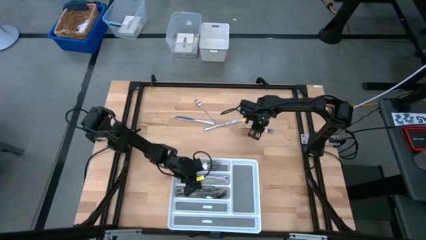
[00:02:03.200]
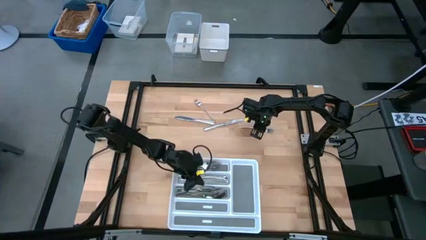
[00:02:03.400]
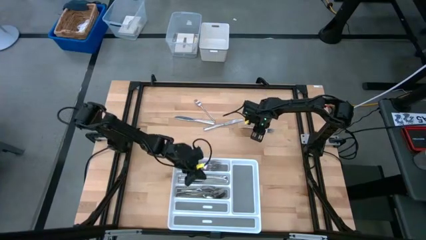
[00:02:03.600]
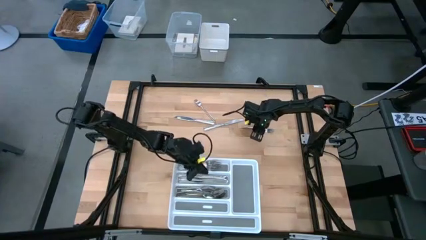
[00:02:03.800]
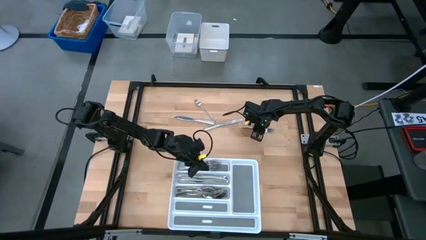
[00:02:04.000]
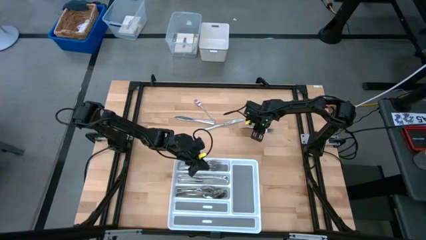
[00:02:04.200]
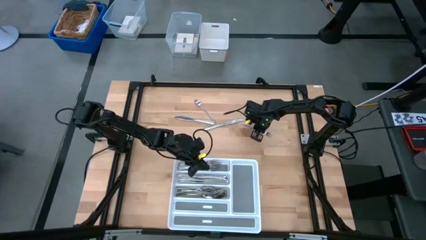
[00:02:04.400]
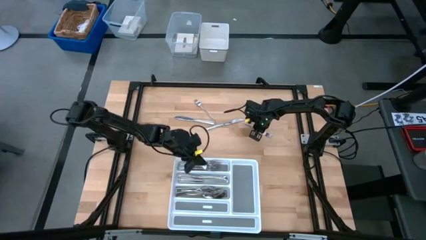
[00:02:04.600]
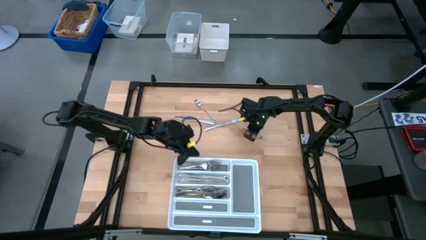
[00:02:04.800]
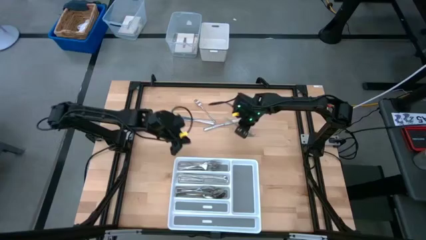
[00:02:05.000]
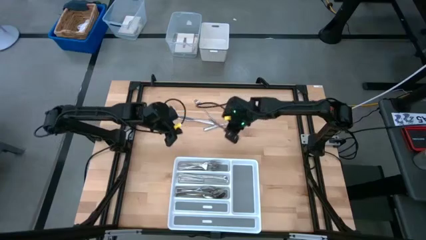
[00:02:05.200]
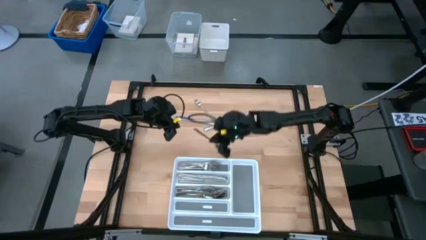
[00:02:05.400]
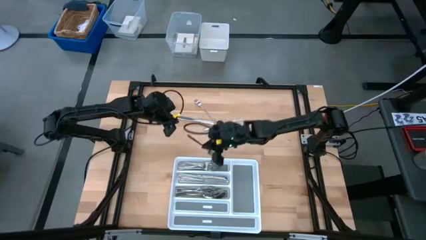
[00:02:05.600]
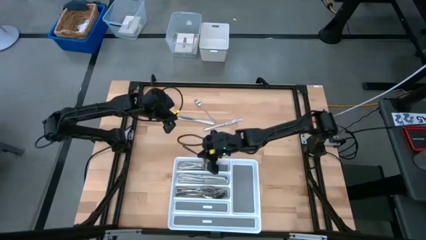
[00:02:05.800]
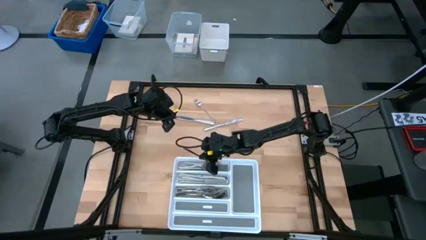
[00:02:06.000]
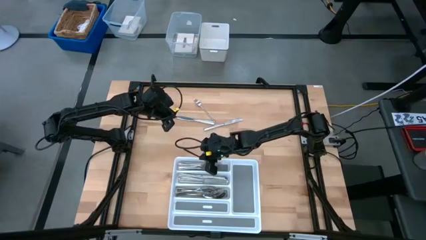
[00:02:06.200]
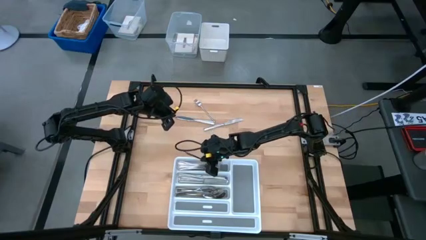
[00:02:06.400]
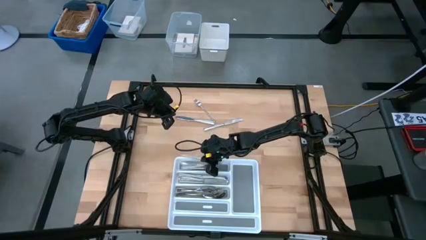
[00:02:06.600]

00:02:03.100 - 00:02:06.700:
Task: Sort silverware
Put the silver fork into the top section of the white silverware tray

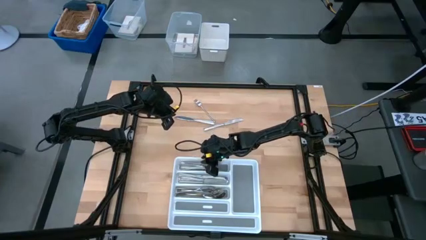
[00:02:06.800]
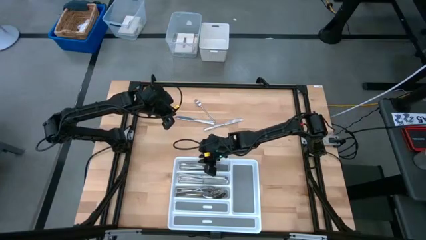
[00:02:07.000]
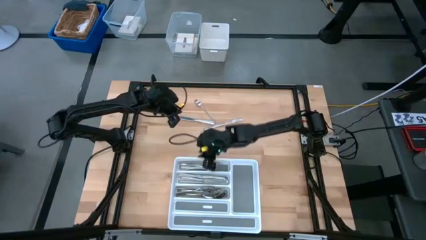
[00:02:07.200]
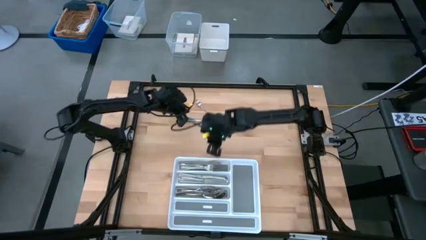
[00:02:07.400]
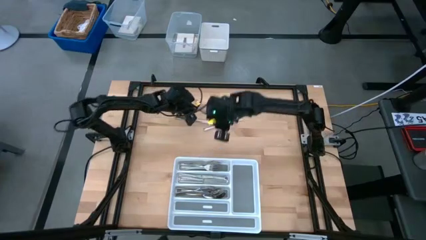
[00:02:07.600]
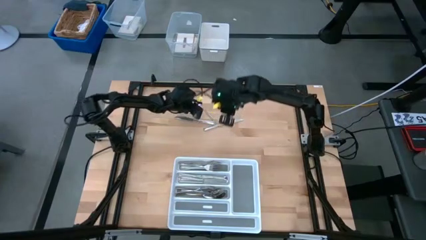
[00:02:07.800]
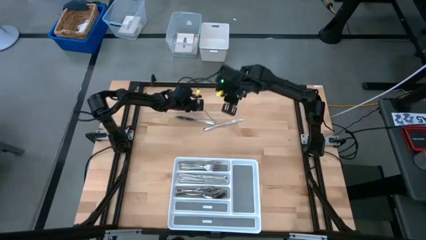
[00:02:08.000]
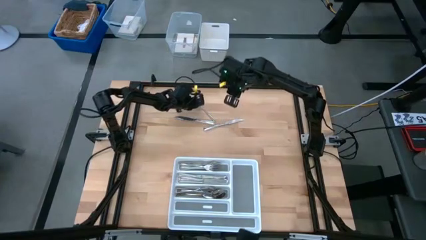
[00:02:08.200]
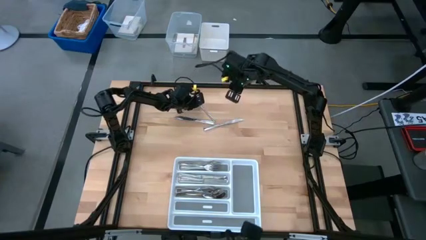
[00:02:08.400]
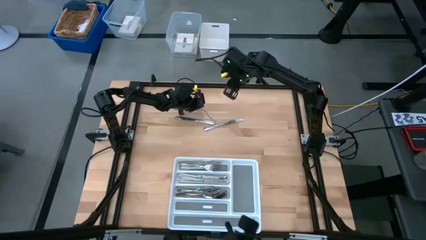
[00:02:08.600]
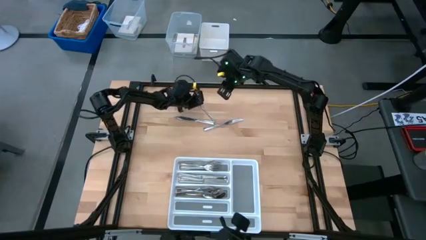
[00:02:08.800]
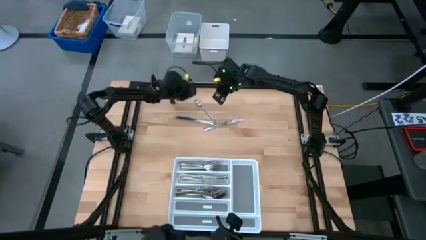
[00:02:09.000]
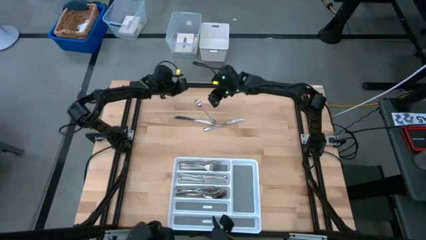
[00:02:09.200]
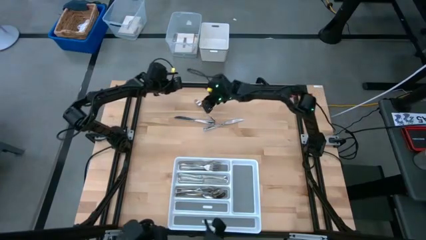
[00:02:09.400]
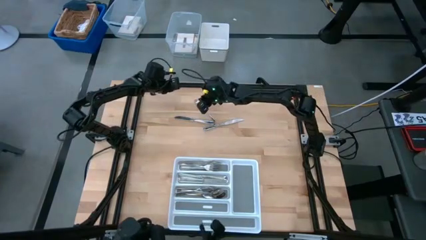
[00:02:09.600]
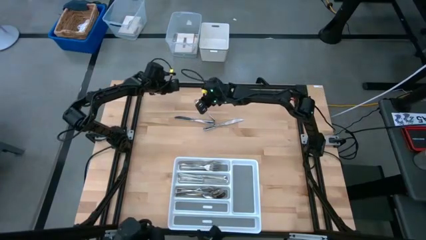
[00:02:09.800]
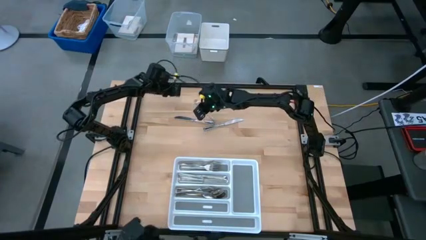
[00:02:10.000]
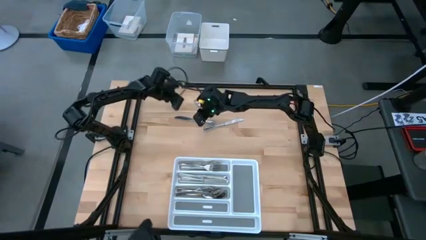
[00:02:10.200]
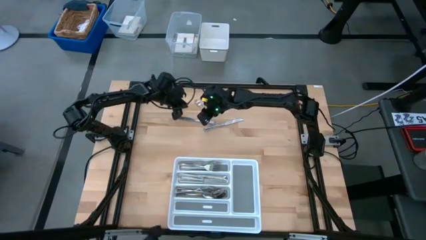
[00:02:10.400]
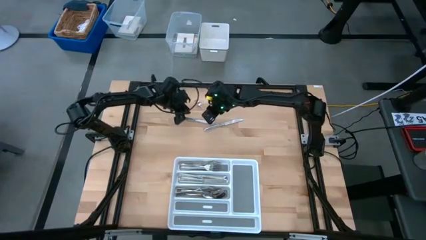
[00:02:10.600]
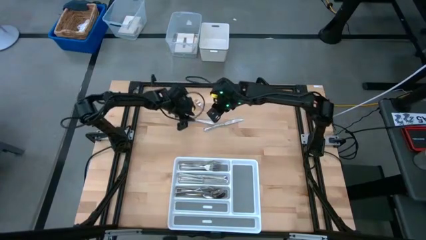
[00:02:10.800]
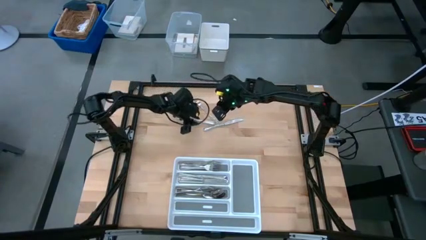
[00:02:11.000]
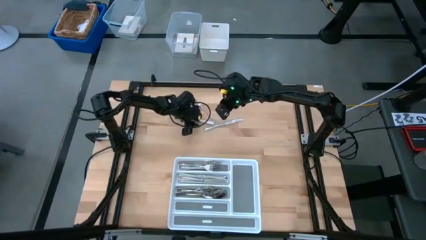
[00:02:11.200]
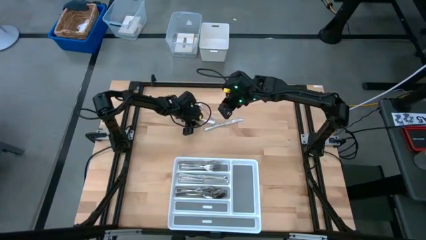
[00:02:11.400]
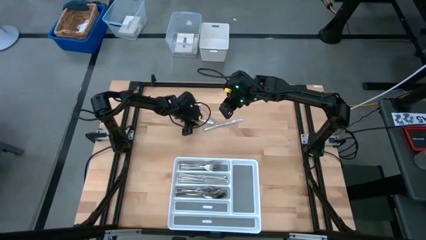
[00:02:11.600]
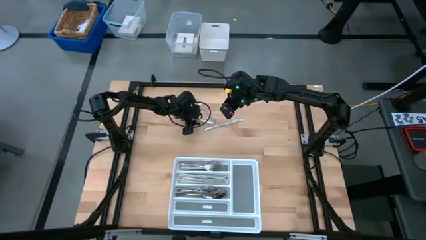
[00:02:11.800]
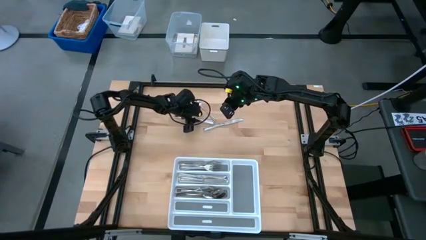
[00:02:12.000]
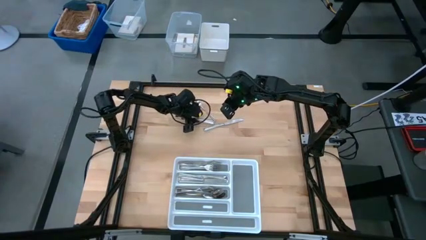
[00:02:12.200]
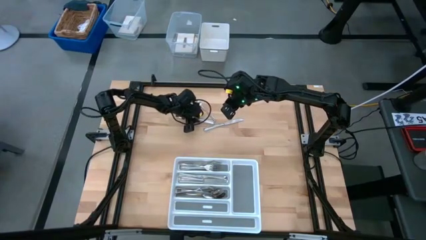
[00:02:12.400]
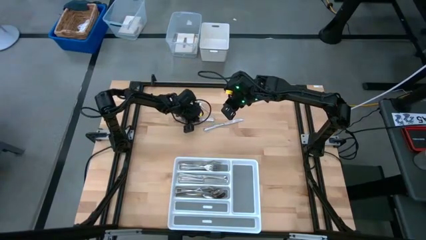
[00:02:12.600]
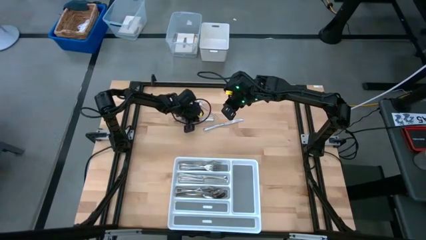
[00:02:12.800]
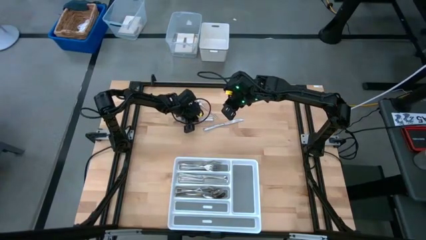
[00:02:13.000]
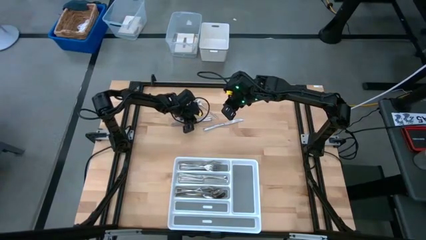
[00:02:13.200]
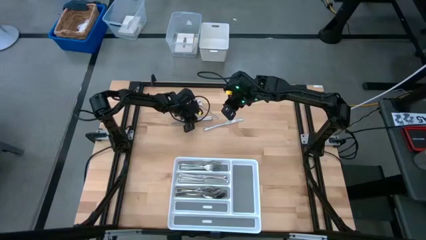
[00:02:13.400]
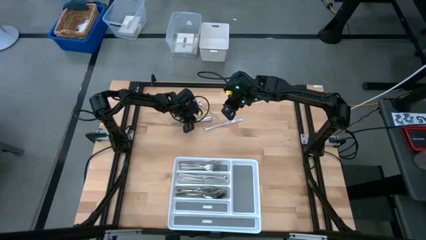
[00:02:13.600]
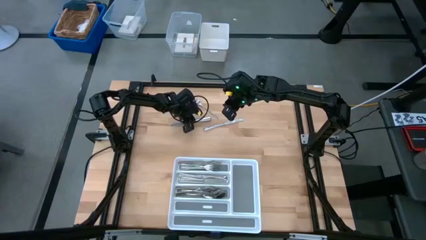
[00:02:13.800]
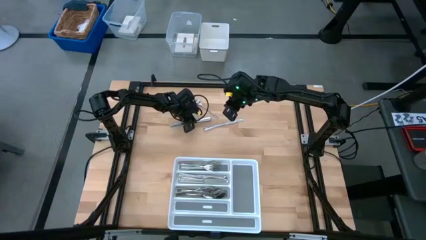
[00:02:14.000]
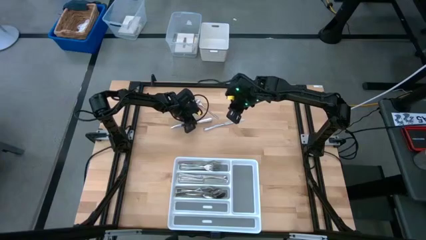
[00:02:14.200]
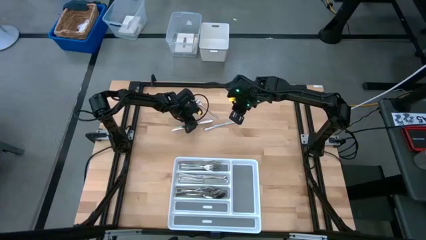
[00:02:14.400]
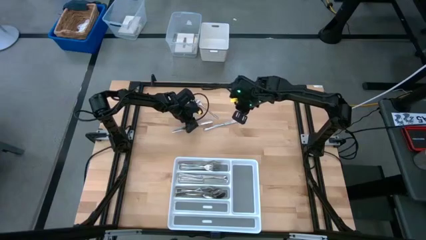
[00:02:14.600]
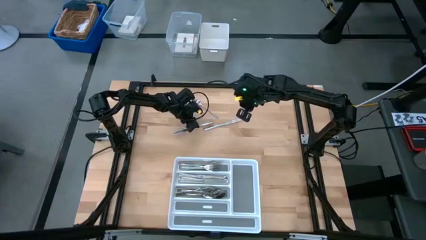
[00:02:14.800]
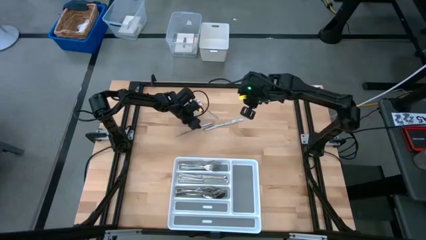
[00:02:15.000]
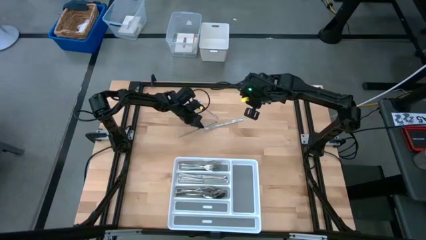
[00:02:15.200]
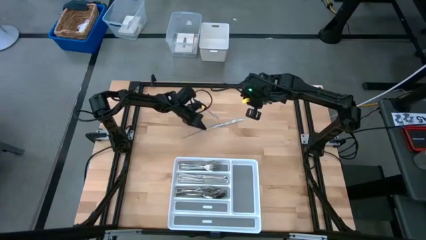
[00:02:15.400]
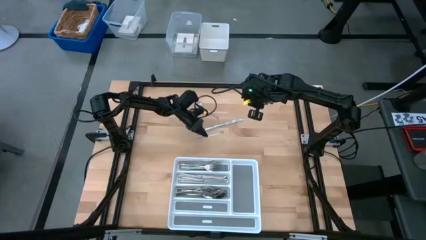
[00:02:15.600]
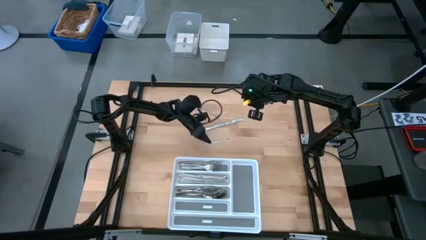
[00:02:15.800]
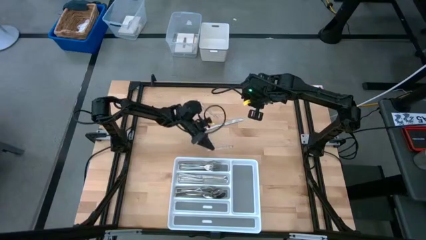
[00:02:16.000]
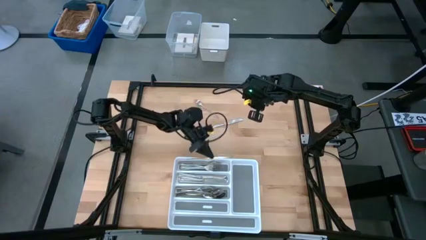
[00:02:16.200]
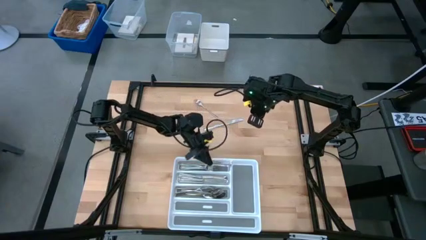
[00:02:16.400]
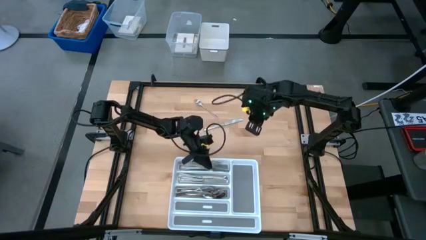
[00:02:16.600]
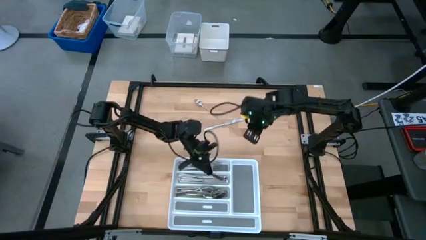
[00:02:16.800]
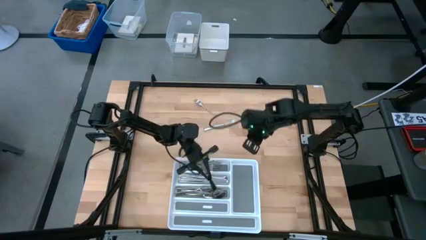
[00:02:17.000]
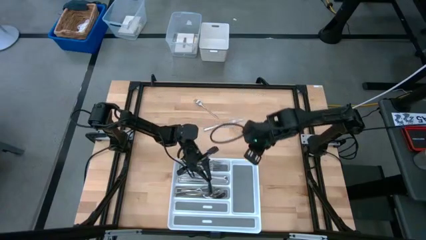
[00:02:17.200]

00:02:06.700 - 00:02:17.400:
Put the silver knife into the middle section of the white silverware tray

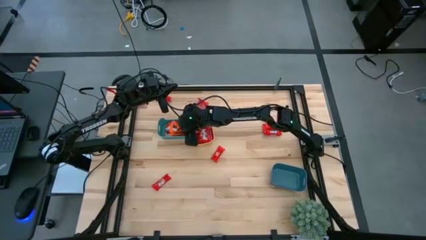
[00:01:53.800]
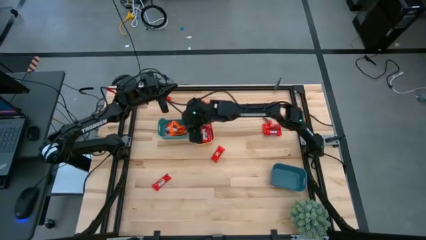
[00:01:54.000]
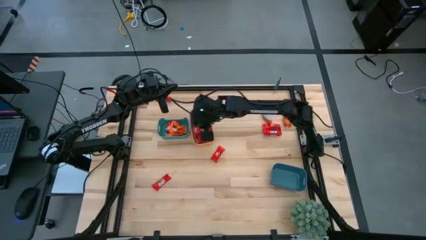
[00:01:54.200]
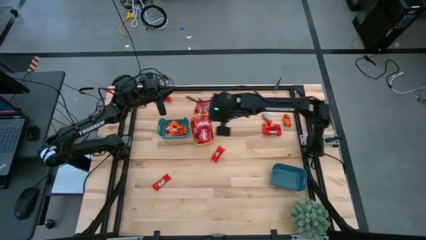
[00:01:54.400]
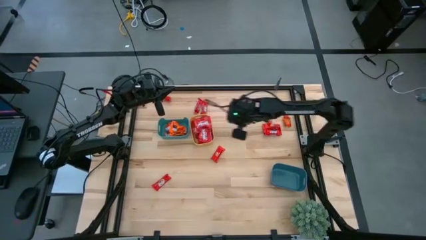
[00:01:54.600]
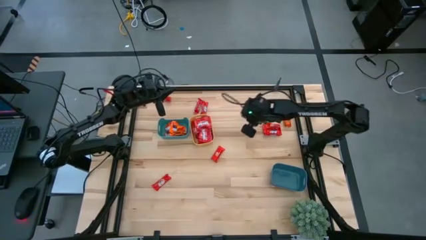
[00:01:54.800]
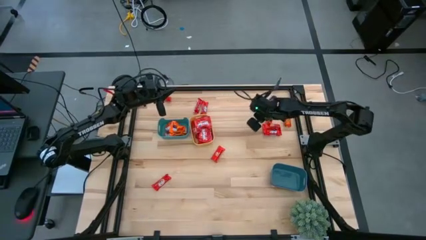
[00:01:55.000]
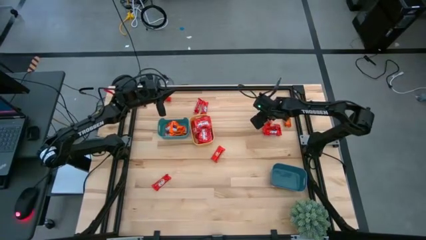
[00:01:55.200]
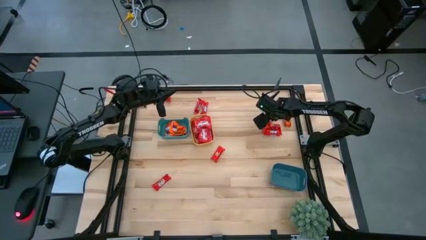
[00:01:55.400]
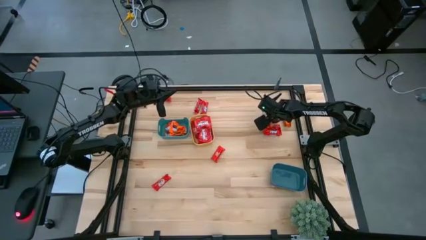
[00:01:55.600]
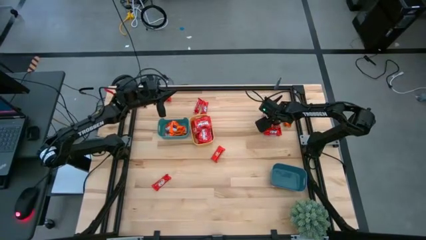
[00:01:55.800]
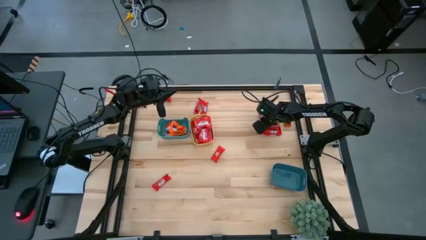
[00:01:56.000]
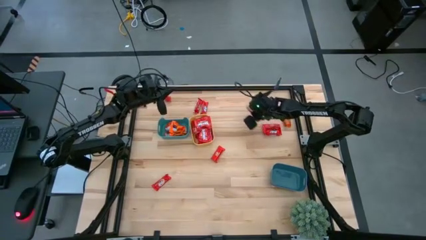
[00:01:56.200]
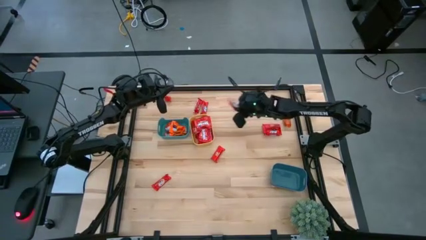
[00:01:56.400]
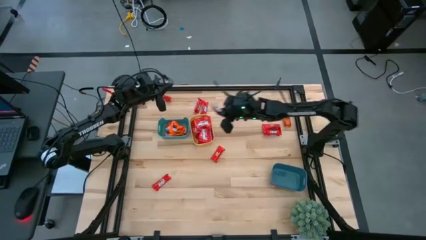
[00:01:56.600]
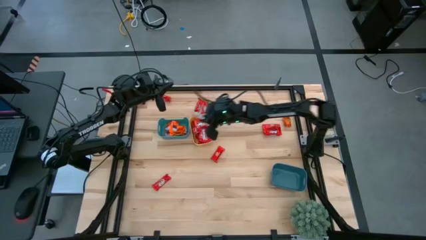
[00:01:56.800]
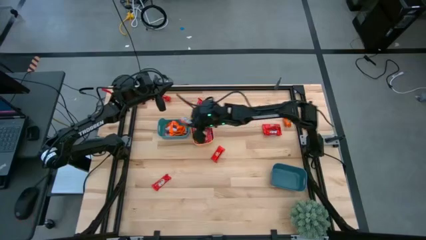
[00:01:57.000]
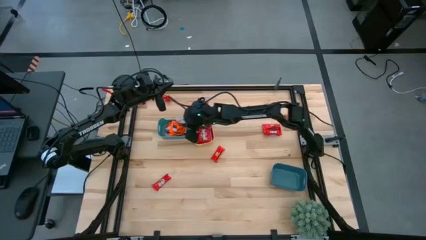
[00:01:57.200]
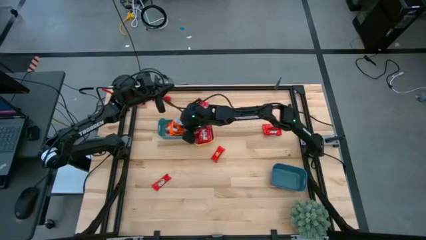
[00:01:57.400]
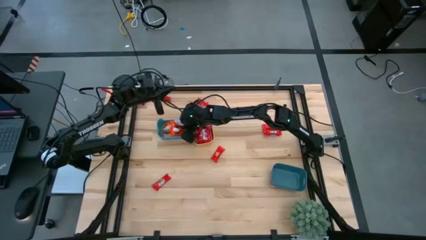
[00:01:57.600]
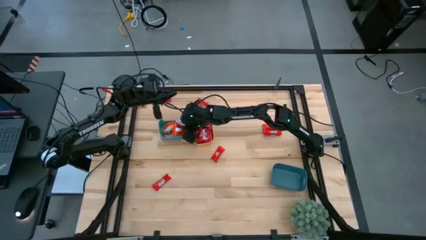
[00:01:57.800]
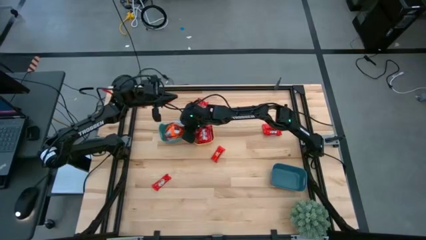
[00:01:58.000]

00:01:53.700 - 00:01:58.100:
Task: Sort candy
Put the orange candy into the green bin
